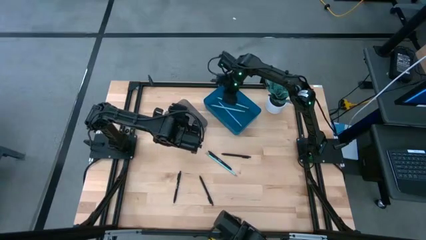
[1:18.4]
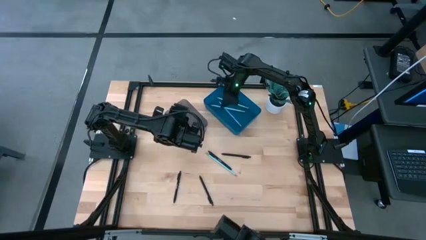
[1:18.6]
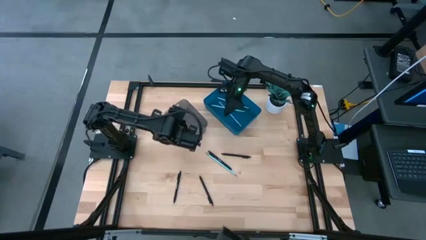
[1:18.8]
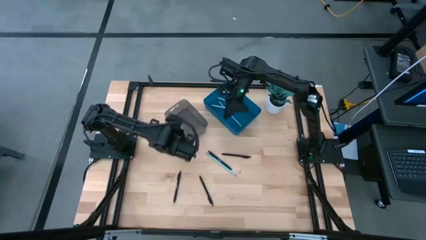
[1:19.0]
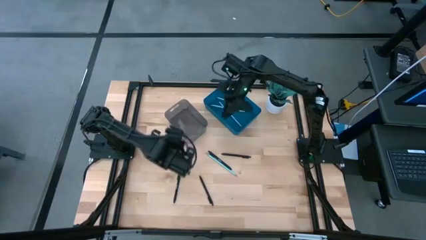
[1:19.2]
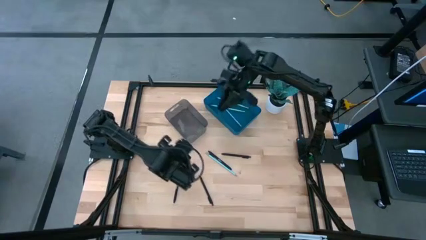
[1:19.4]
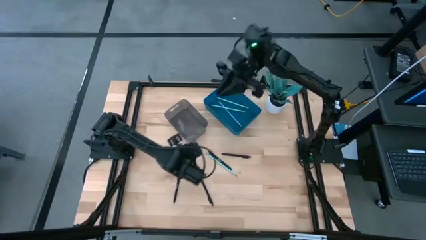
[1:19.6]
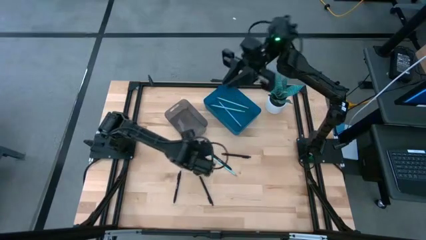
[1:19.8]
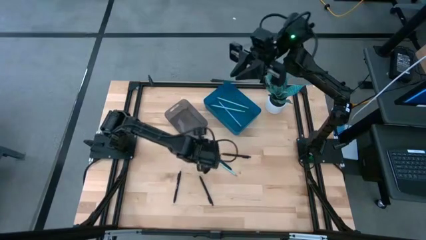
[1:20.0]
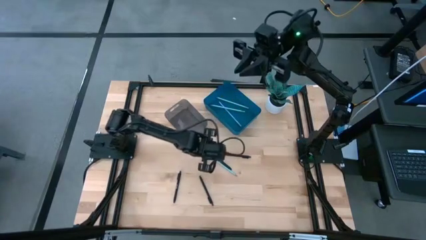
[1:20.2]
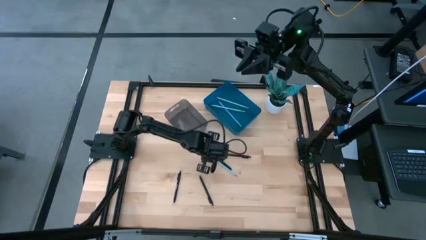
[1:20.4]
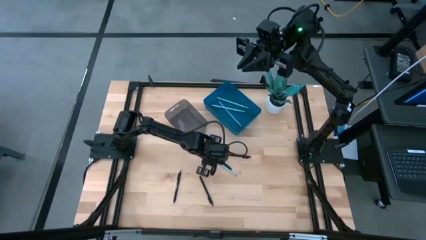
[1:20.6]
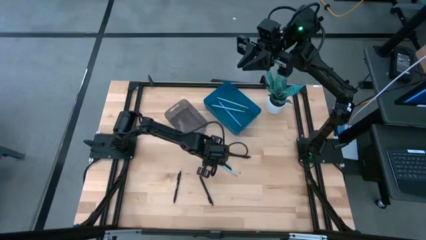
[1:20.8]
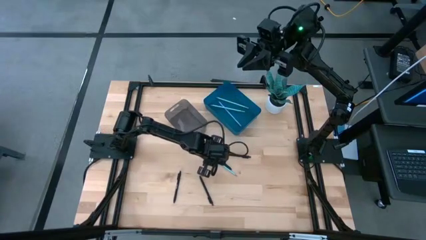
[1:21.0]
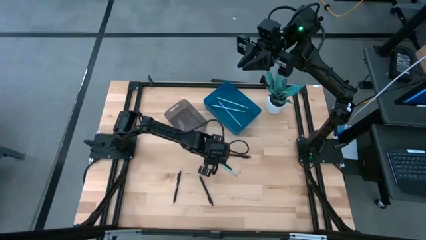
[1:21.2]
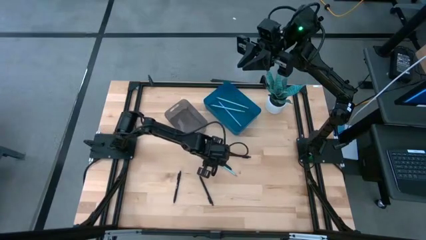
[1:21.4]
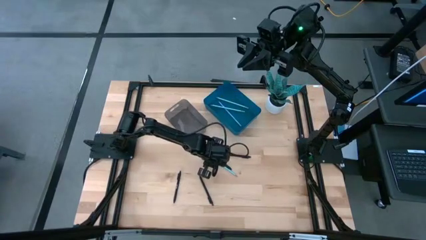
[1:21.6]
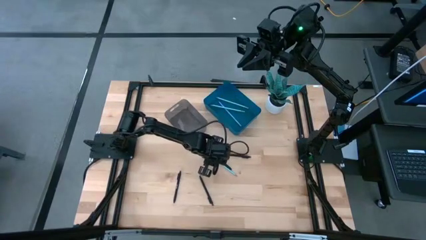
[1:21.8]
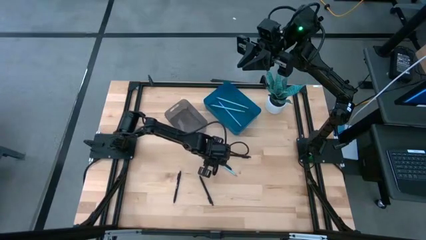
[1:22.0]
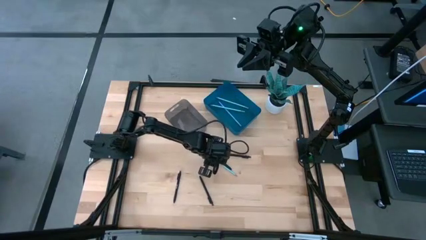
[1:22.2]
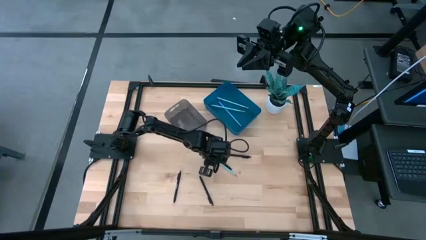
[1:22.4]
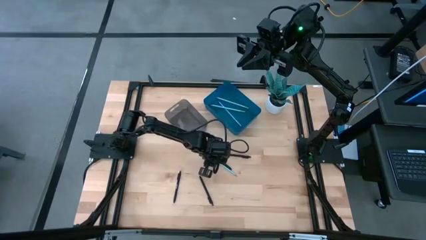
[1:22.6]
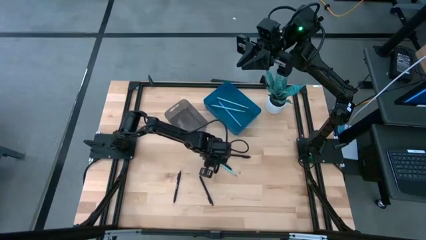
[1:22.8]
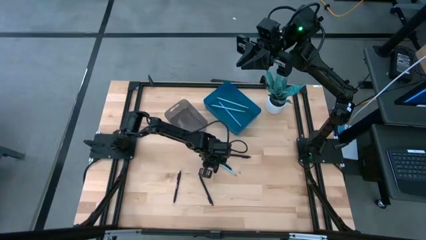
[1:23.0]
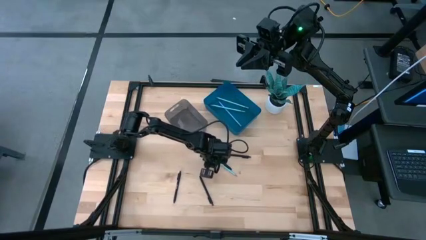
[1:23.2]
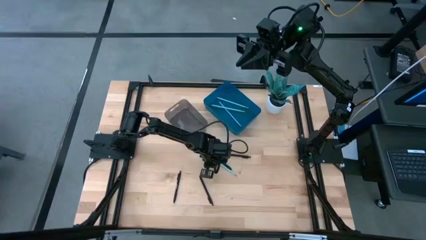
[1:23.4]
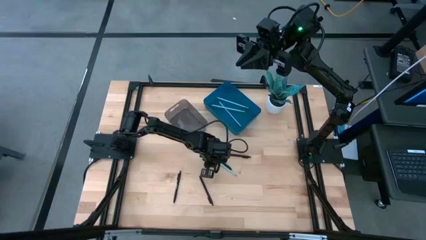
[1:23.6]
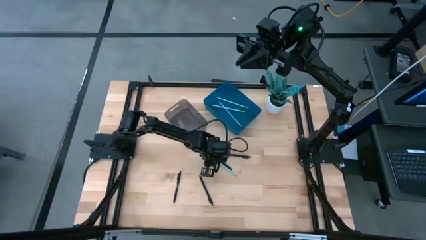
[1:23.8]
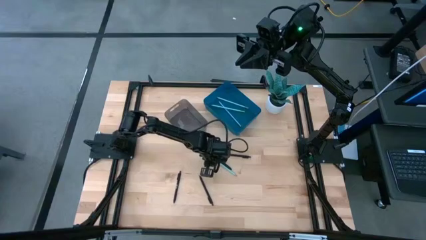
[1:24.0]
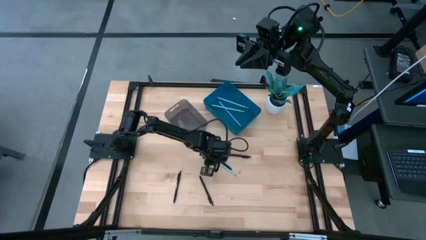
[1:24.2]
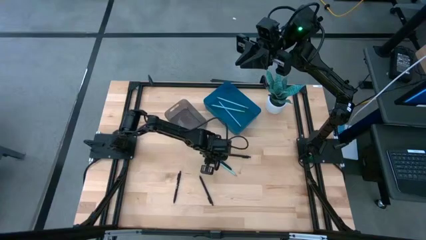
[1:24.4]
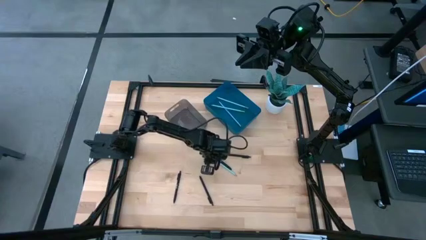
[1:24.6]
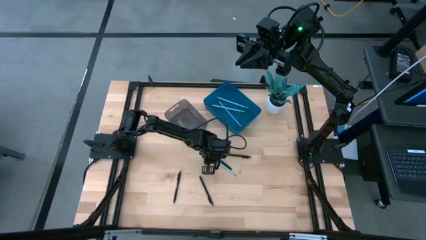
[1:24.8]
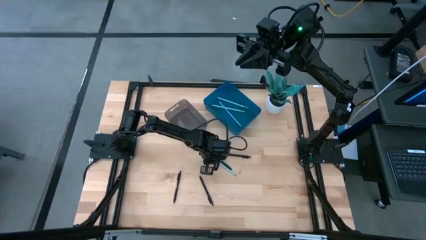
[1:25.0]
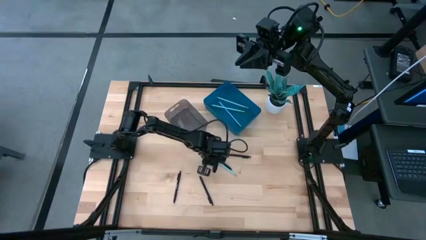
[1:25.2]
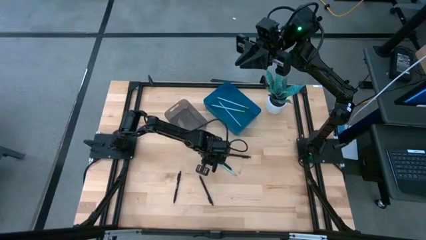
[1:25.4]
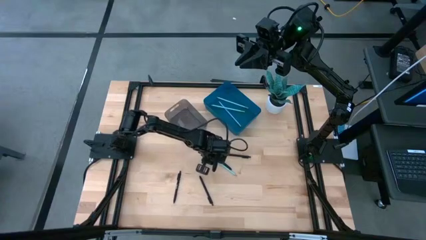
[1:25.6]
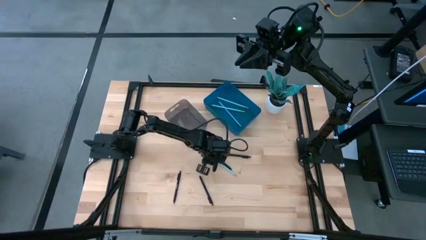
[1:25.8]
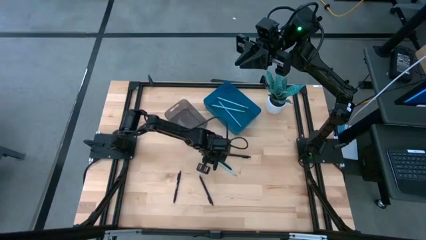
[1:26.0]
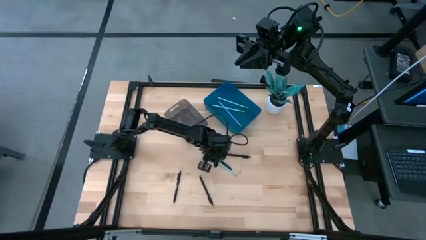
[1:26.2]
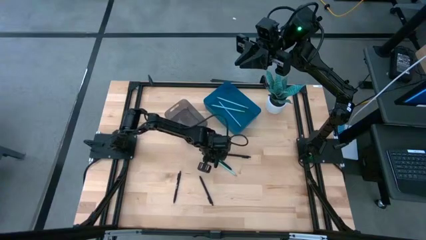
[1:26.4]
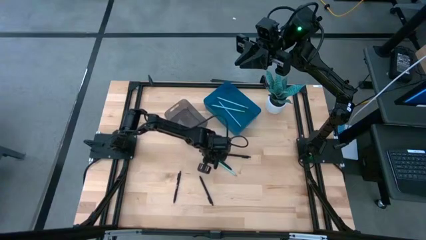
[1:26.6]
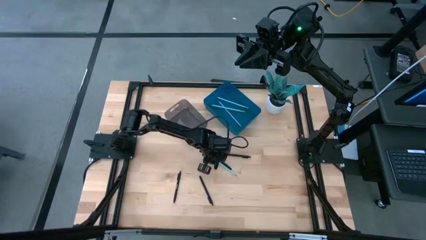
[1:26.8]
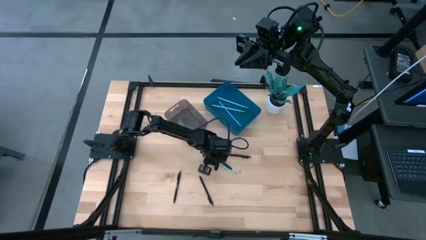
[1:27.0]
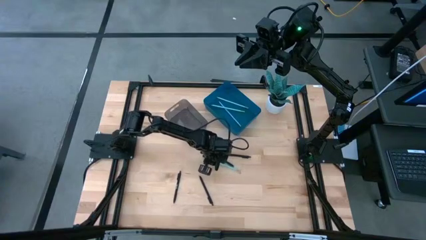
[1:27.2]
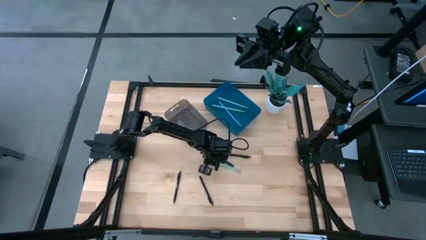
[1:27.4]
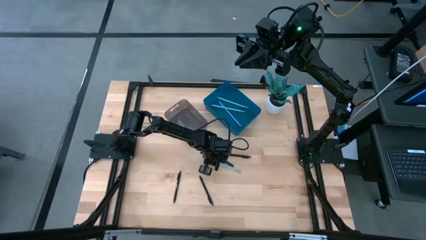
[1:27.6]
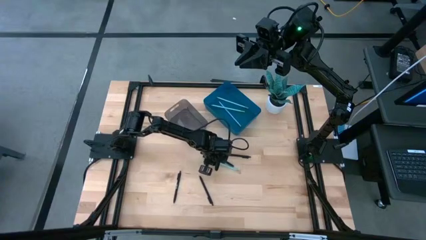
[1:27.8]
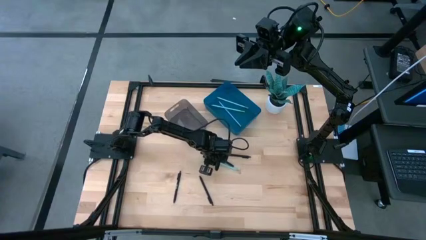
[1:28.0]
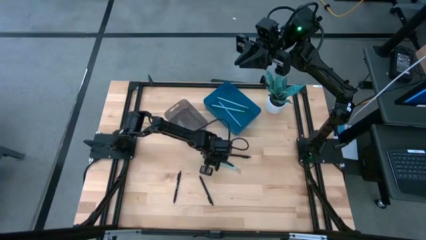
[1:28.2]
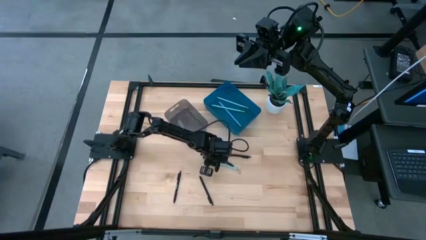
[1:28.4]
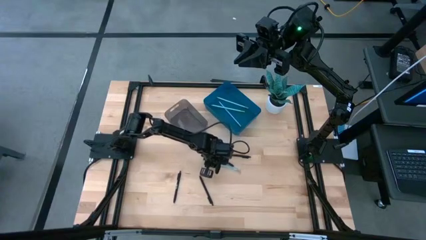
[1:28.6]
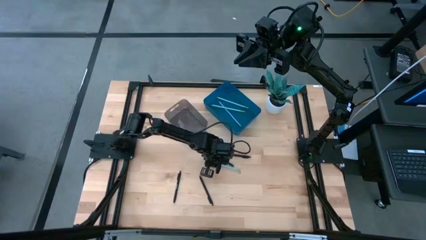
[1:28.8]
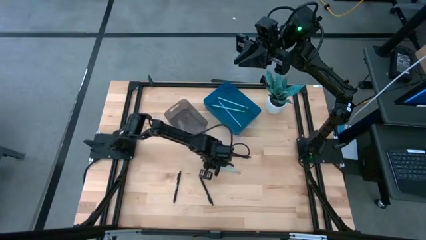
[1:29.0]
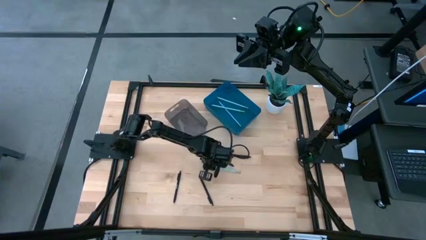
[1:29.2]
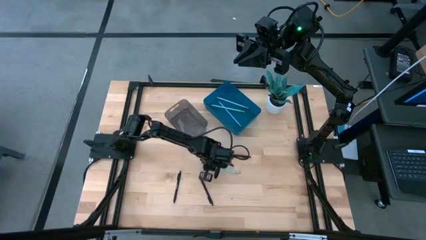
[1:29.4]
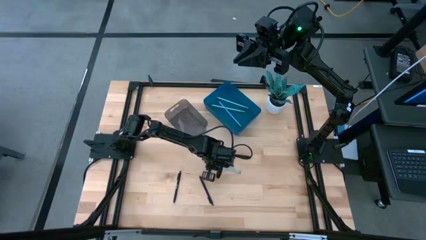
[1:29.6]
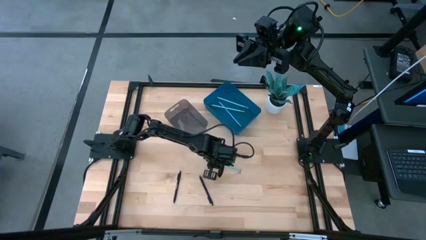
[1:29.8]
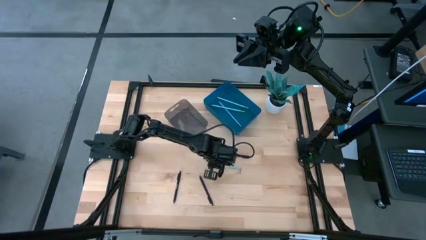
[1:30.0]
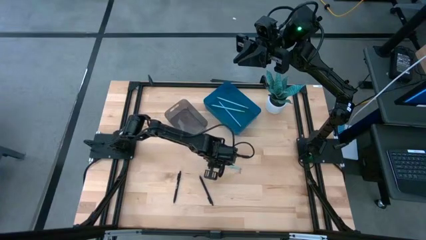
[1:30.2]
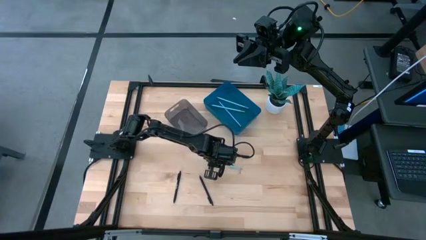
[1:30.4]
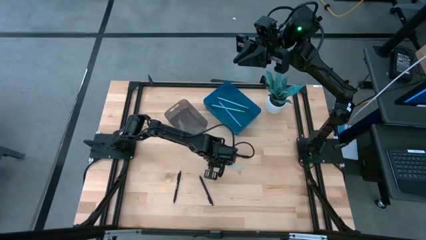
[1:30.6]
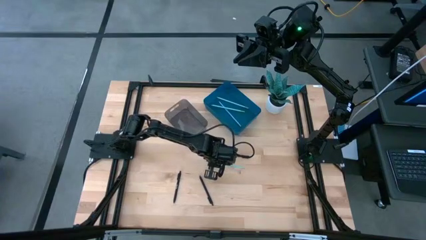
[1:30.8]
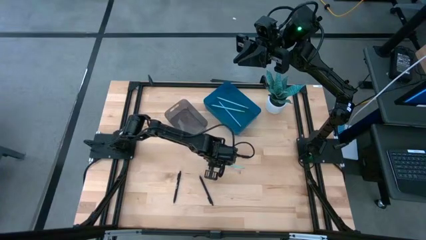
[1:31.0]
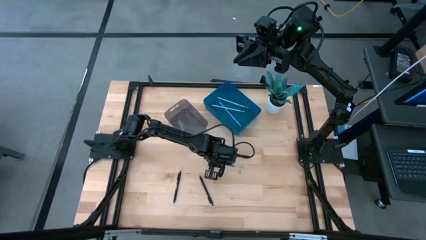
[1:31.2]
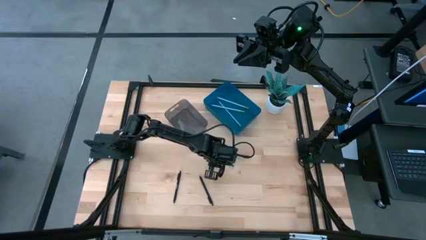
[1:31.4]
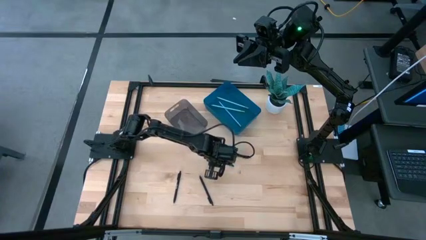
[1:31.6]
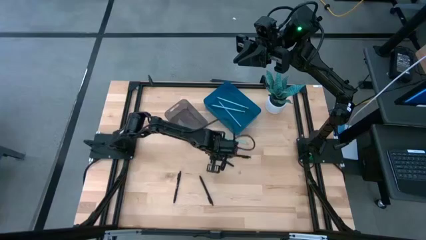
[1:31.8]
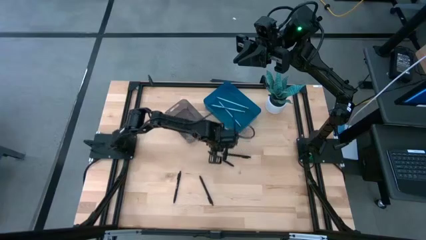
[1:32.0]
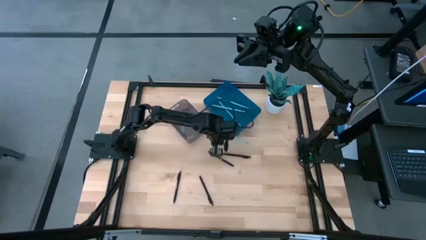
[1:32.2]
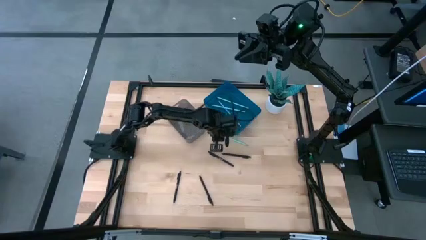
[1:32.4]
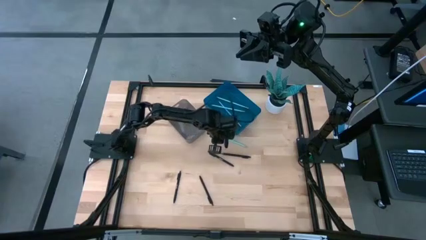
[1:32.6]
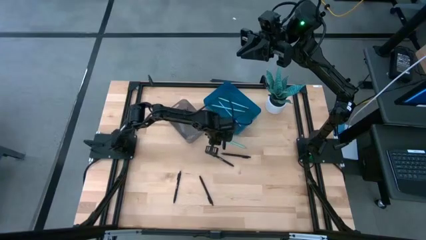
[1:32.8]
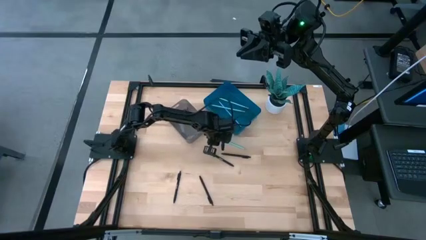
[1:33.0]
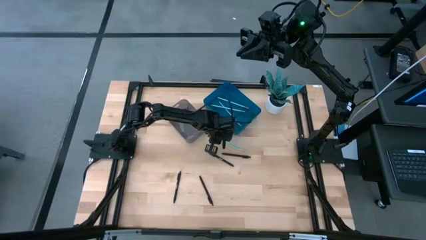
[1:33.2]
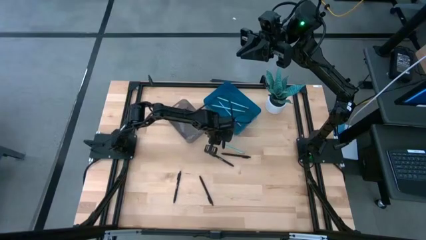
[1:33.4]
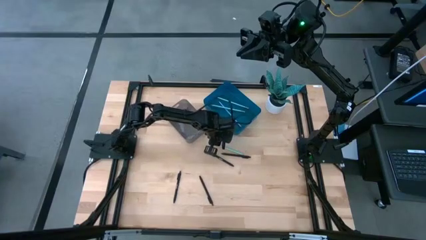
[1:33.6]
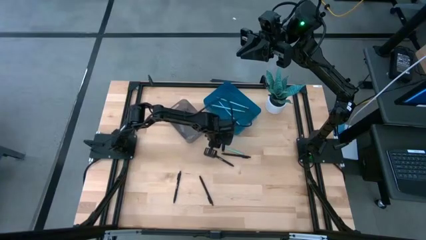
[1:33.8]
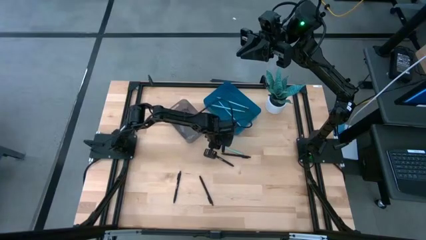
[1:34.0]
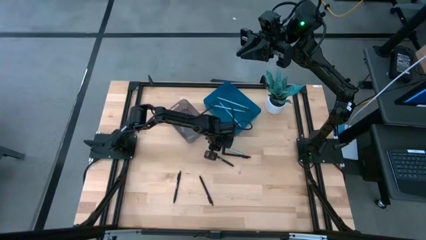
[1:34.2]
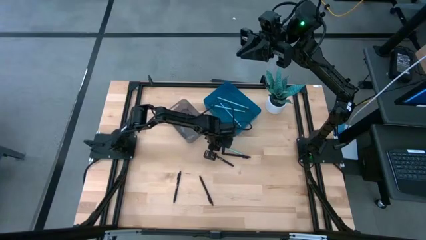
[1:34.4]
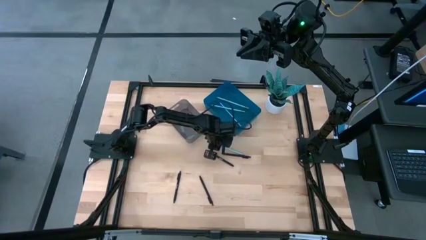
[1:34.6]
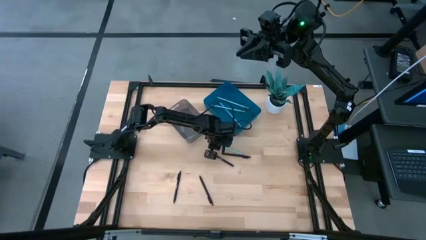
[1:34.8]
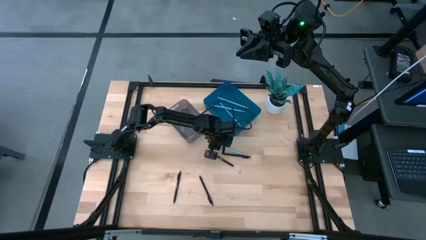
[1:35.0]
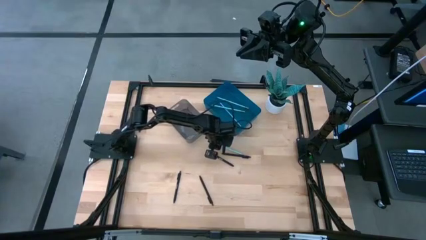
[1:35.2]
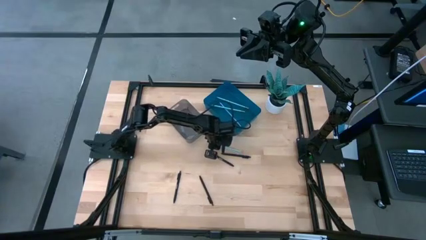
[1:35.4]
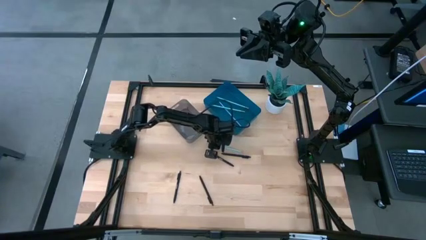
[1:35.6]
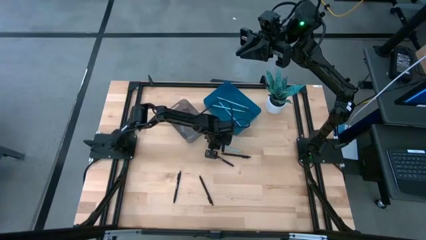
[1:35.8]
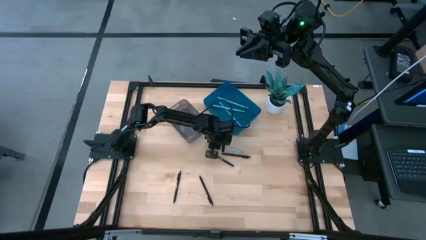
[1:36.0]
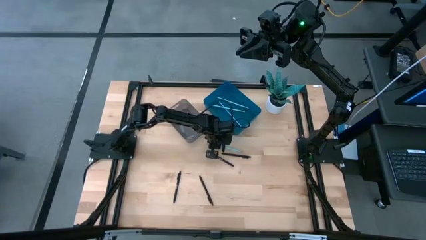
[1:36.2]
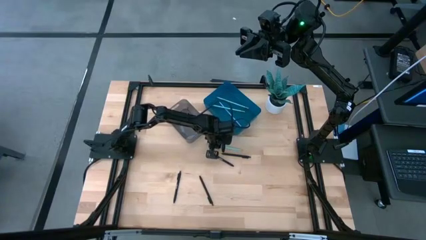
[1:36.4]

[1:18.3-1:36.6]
Task: Sort pens & pencils
Put the light blue pencil into the blue bin
